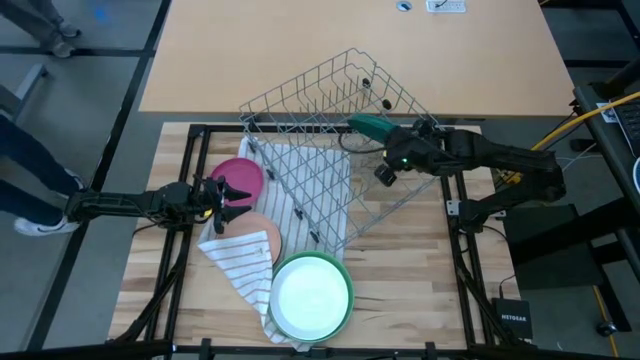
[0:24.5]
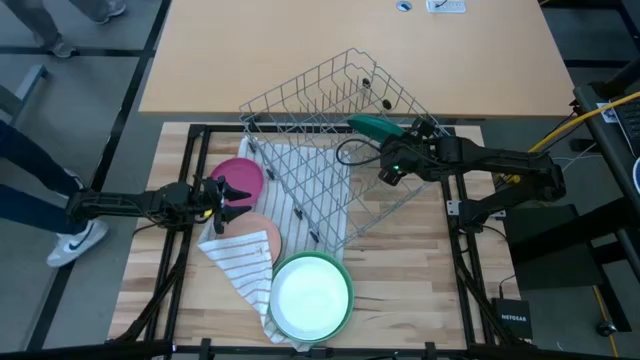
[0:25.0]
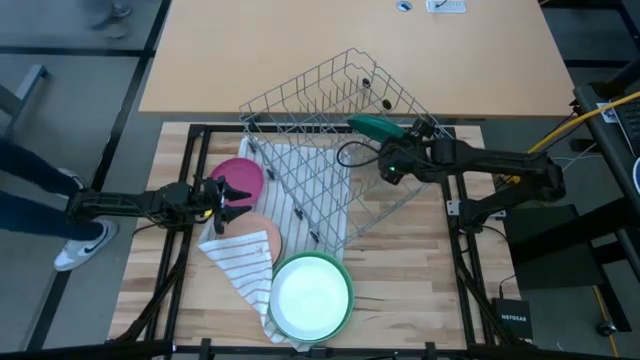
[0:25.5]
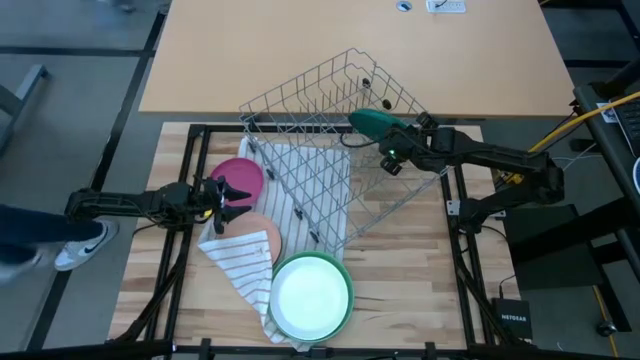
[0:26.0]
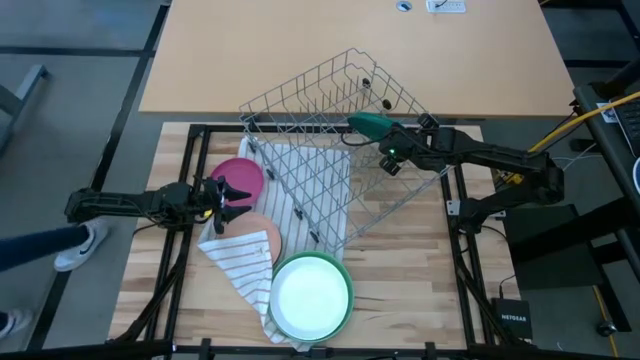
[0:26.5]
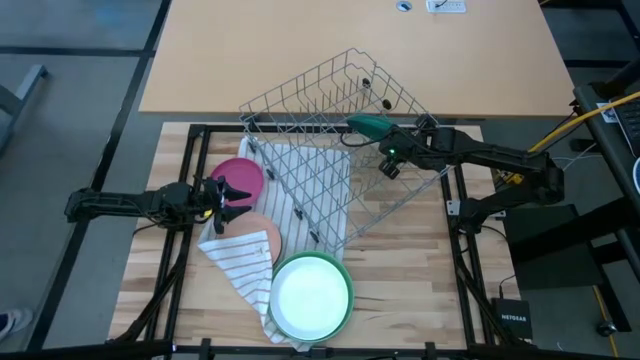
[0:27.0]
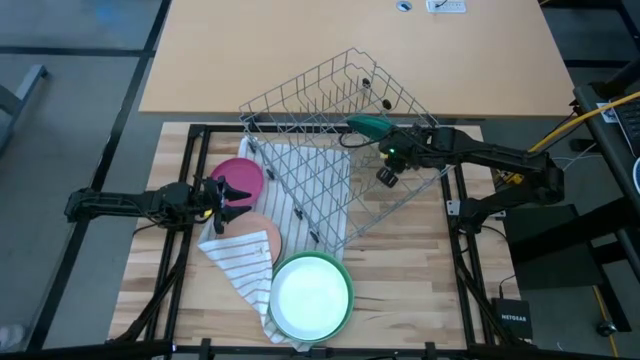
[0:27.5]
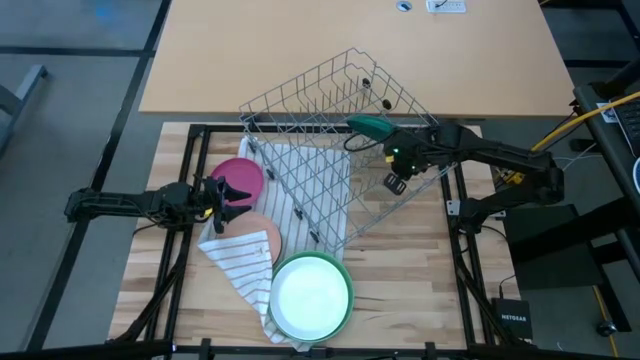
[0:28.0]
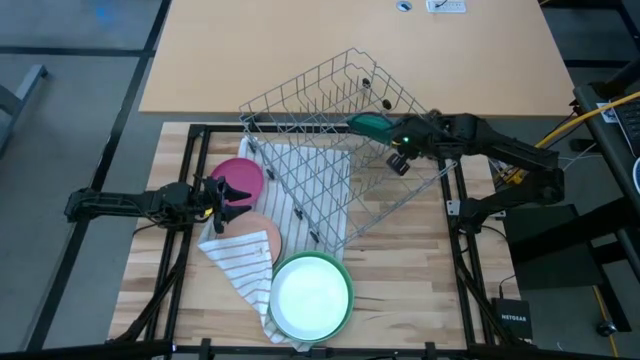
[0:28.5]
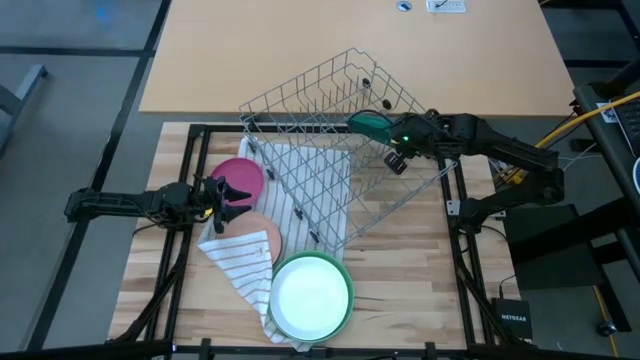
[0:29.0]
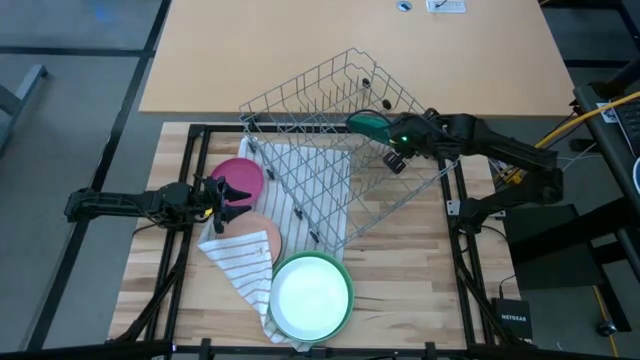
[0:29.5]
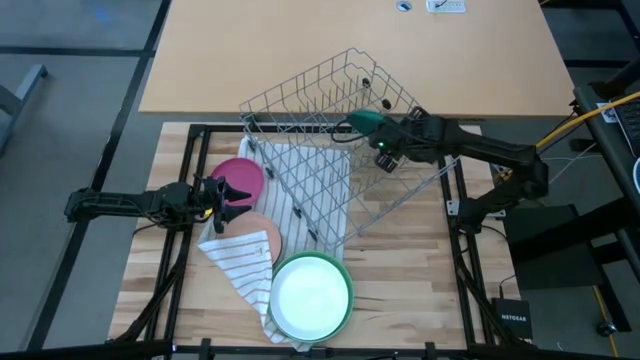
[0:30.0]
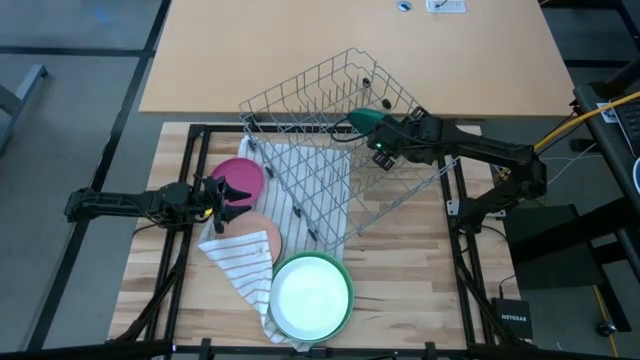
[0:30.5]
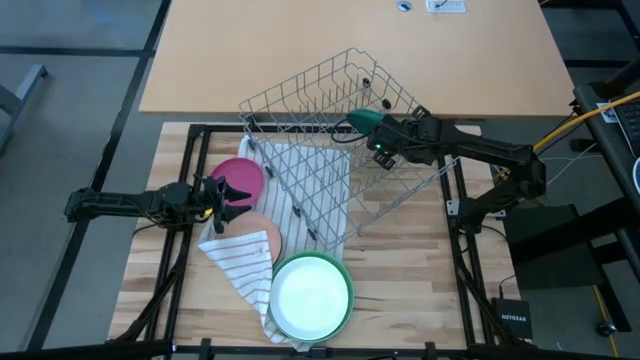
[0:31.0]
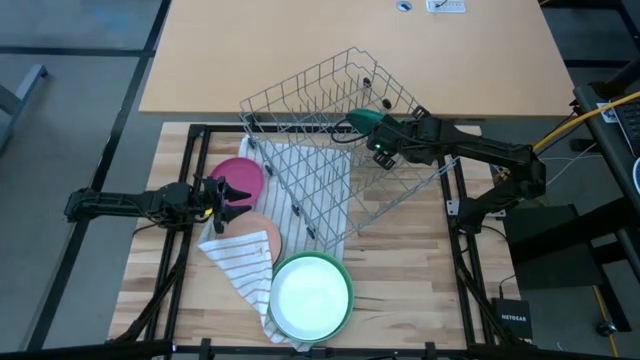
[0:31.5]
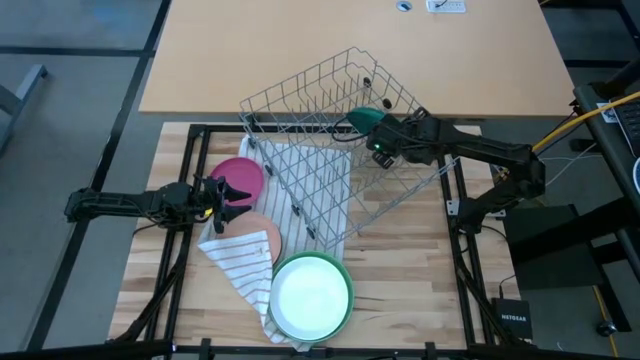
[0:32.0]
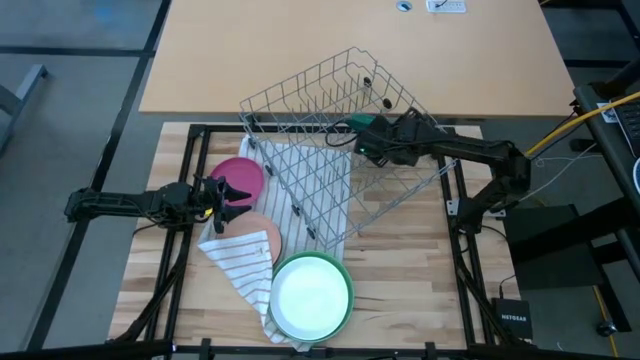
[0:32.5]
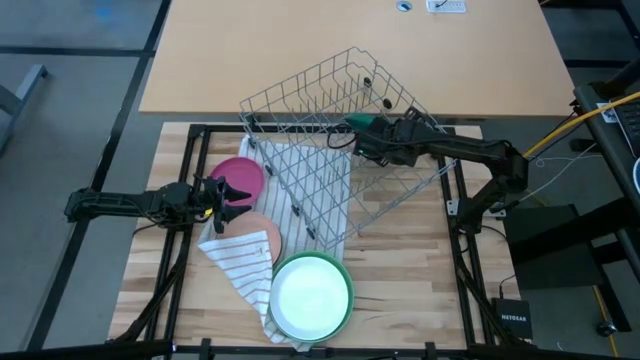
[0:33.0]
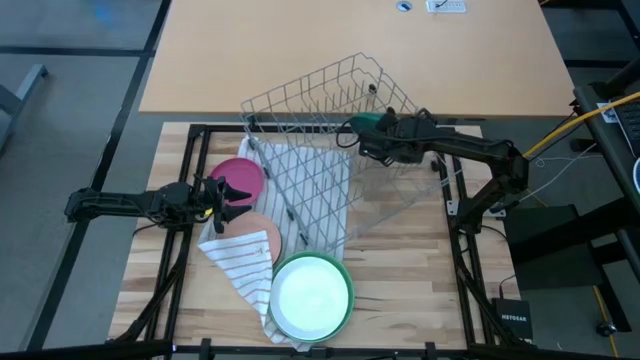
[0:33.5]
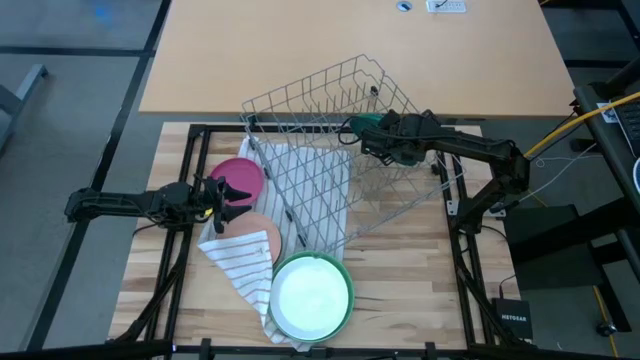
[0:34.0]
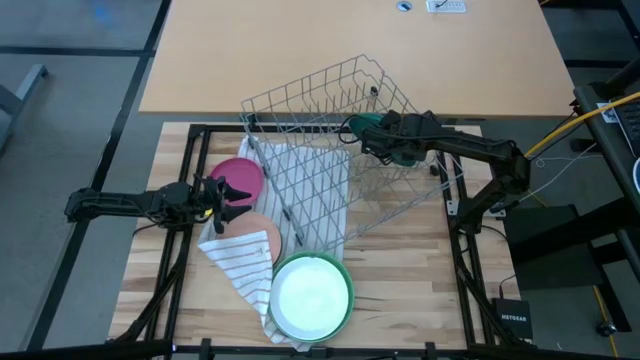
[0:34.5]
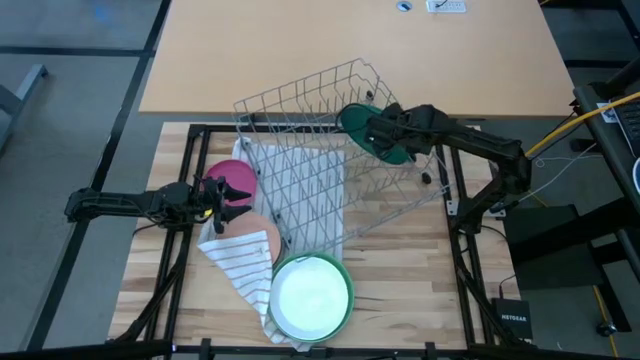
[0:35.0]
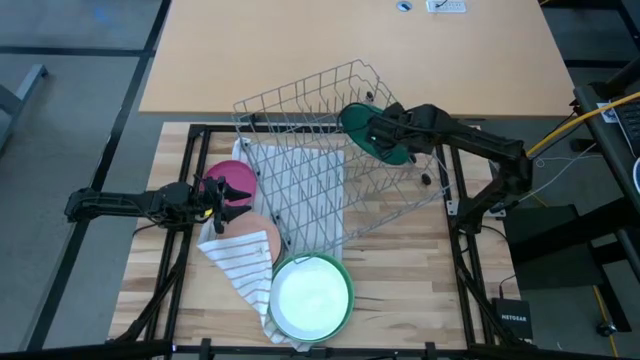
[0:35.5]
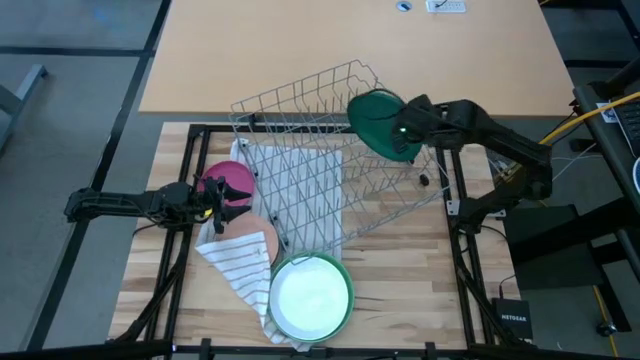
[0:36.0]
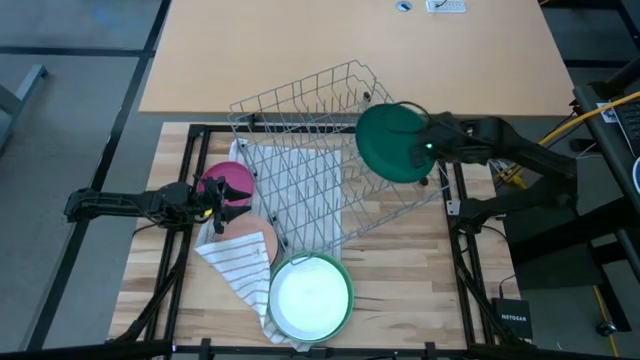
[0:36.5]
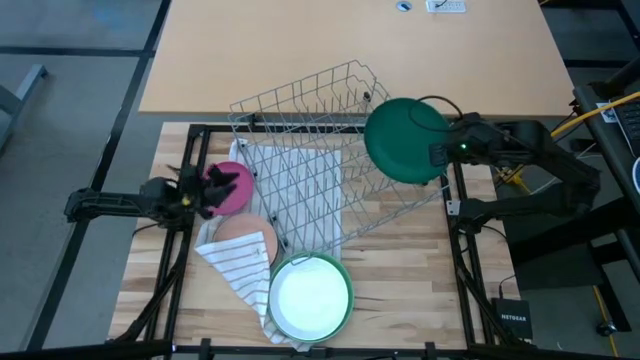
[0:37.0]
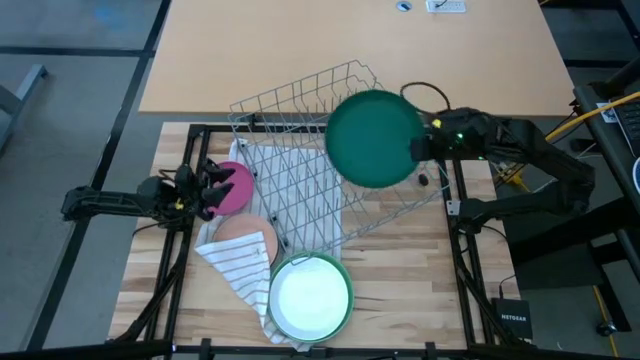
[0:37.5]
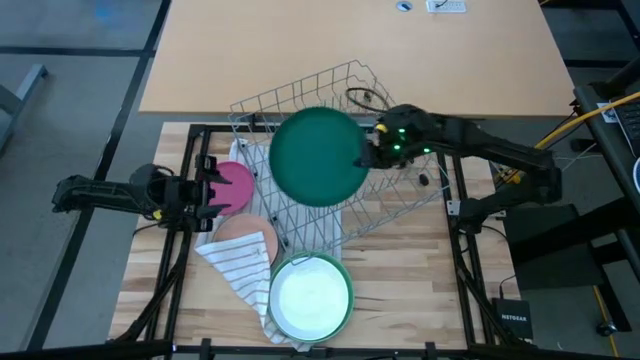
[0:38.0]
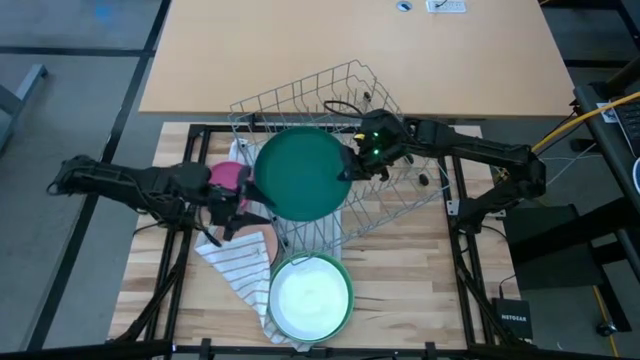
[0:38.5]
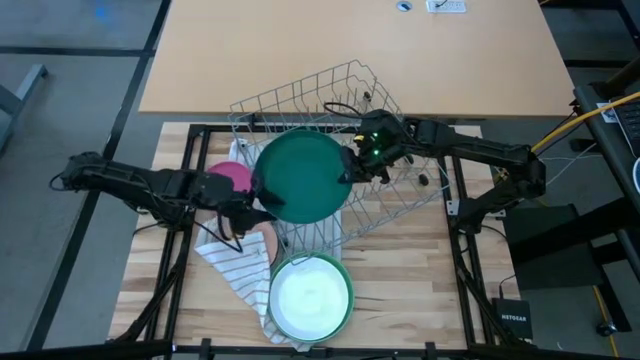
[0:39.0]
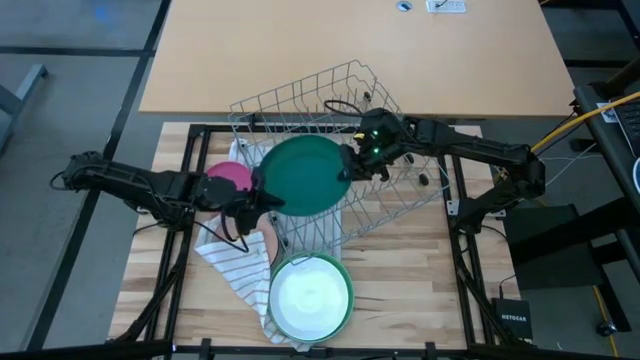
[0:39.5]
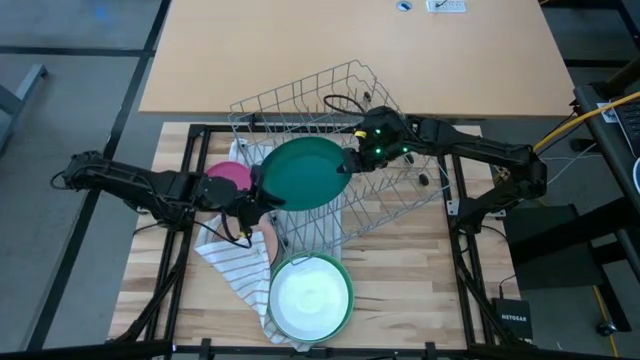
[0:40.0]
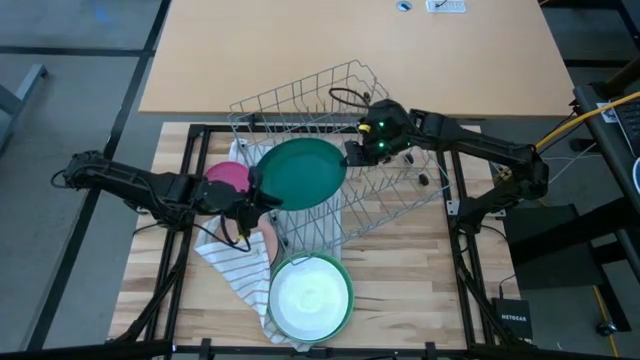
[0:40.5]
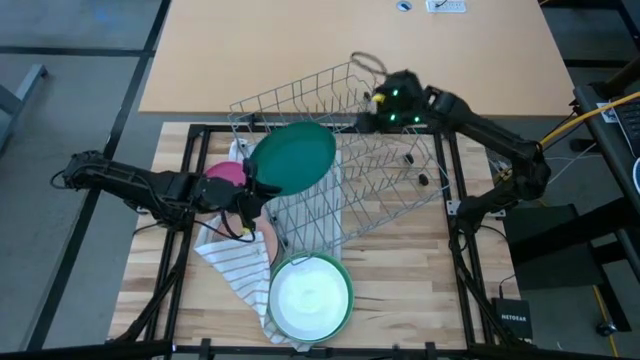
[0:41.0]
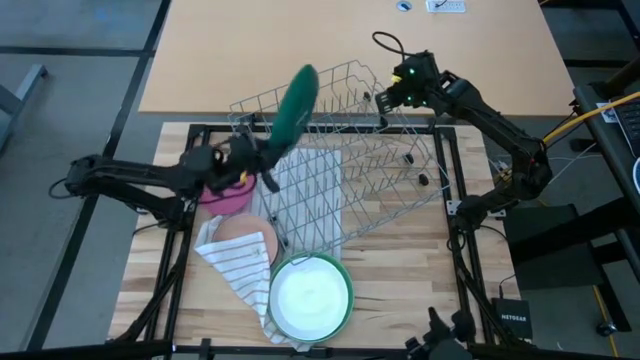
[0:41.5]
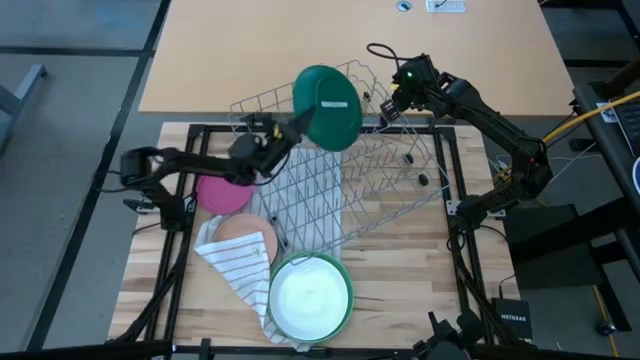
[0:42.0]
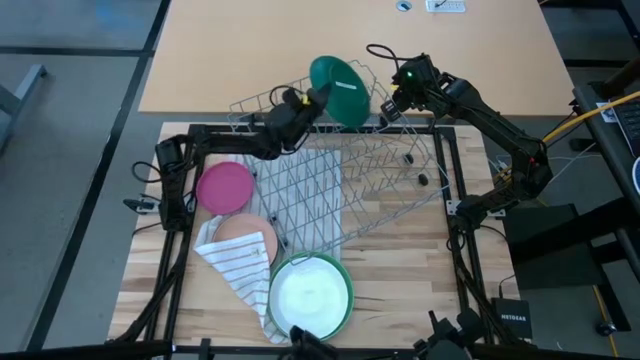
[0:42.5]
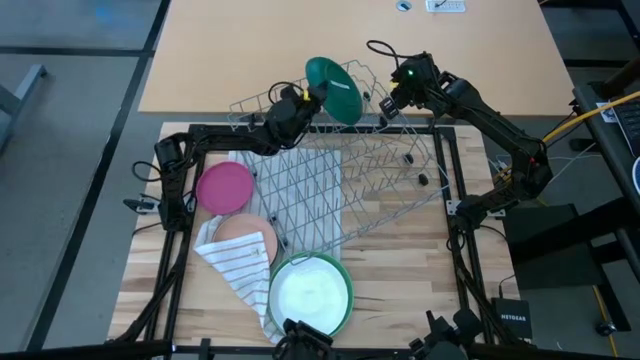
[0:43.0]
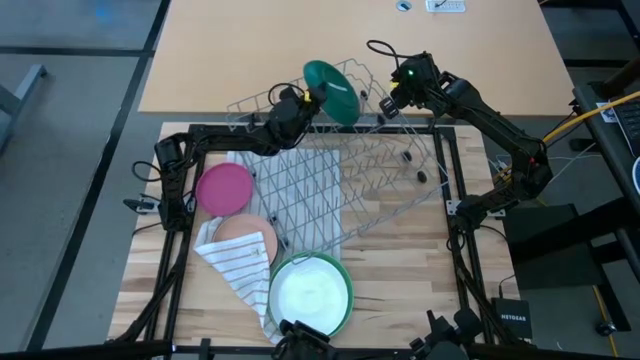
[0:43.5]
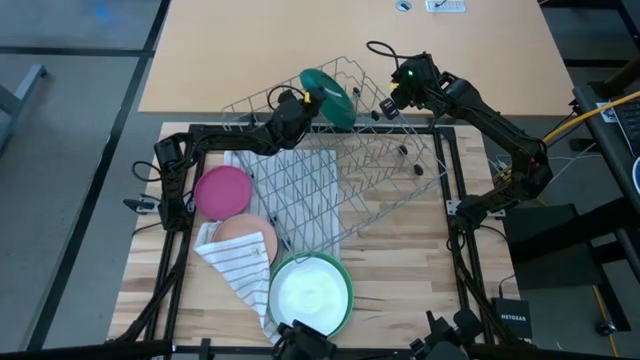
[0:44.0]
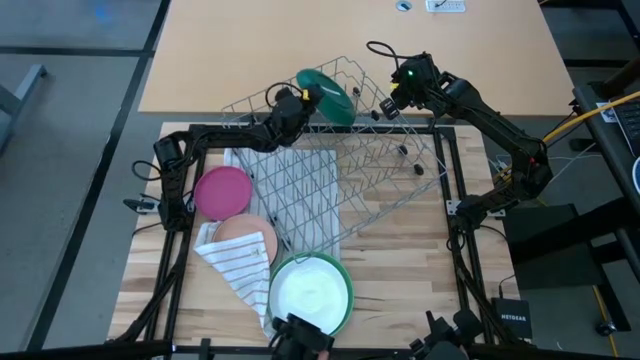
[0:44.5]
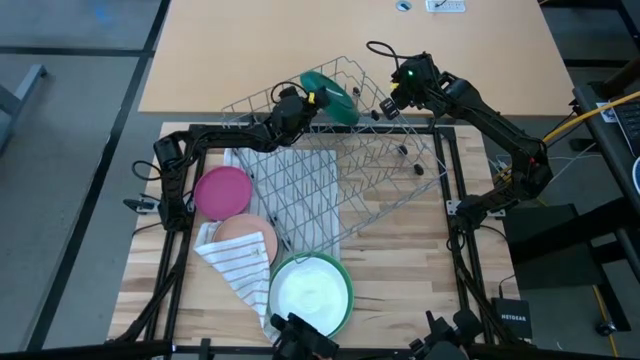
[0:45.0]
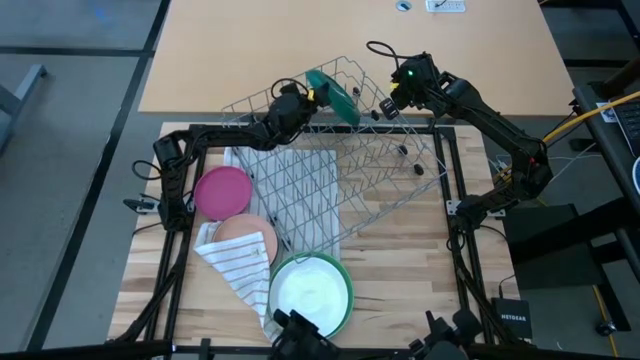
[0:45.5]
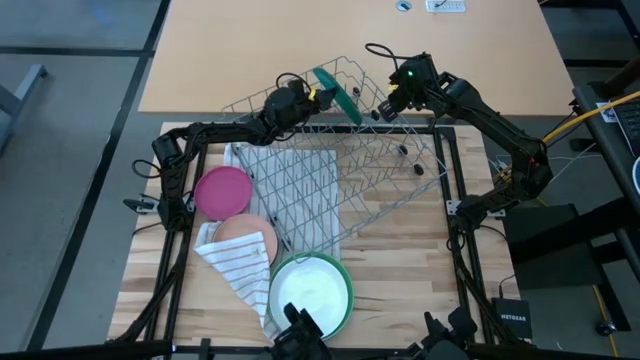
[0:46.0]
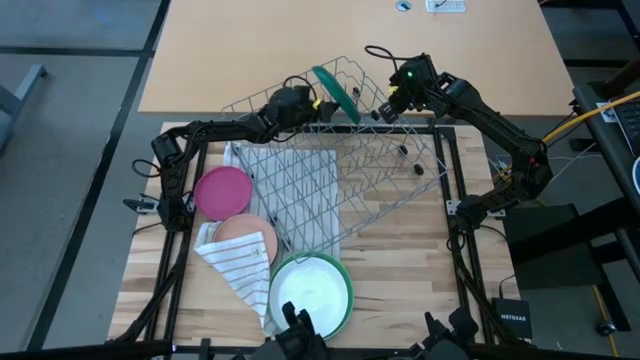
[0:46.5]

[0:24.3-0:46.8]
Task: Sort dishes
Put the top dark green plate in the dish rack
